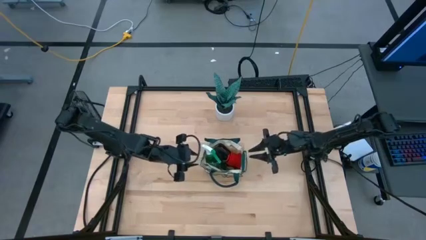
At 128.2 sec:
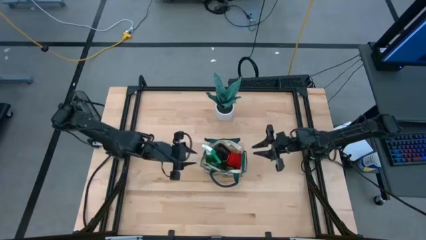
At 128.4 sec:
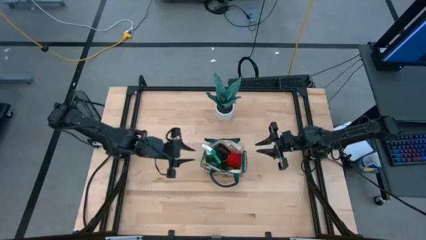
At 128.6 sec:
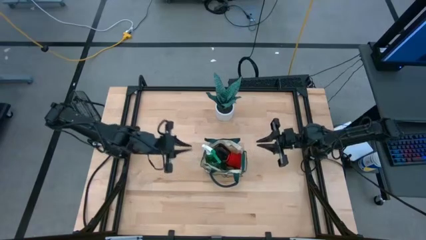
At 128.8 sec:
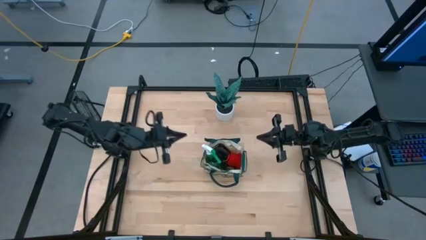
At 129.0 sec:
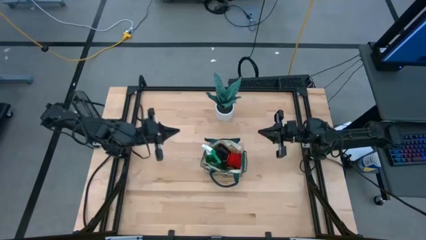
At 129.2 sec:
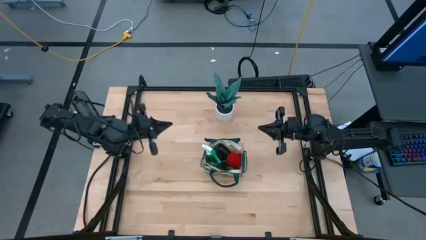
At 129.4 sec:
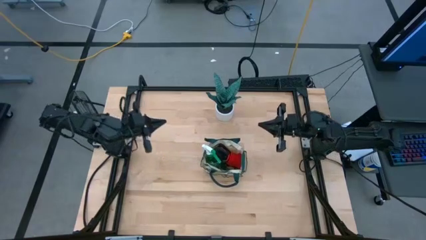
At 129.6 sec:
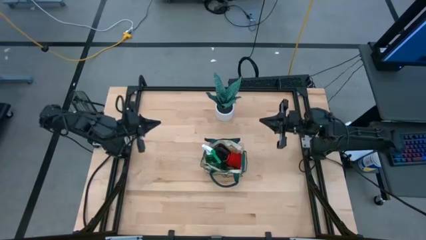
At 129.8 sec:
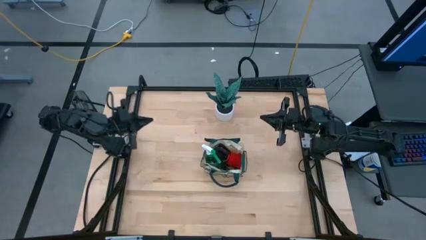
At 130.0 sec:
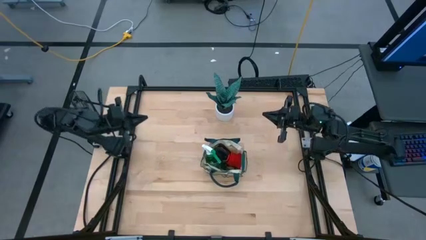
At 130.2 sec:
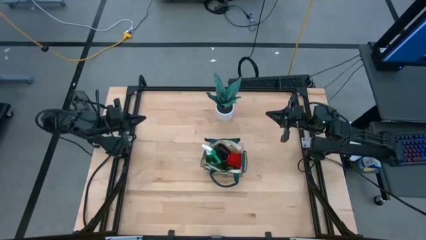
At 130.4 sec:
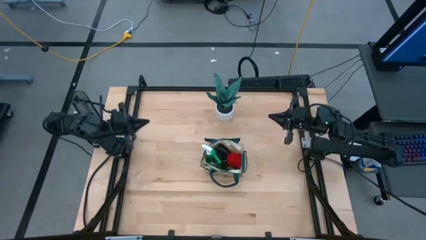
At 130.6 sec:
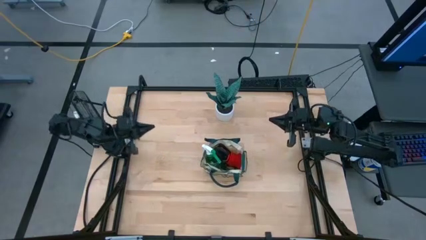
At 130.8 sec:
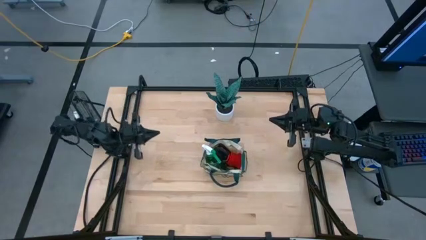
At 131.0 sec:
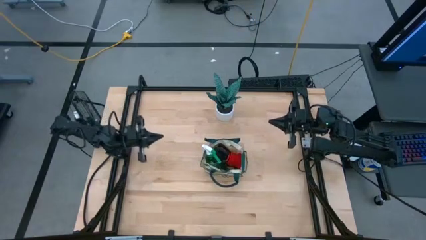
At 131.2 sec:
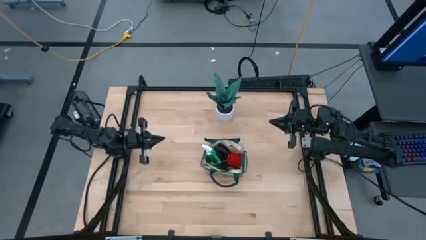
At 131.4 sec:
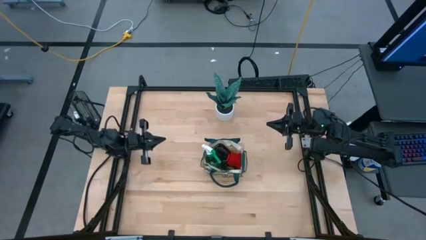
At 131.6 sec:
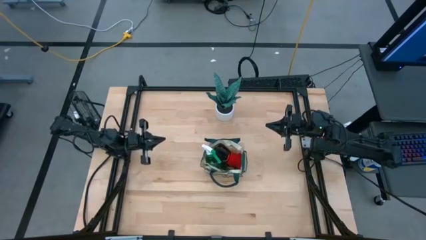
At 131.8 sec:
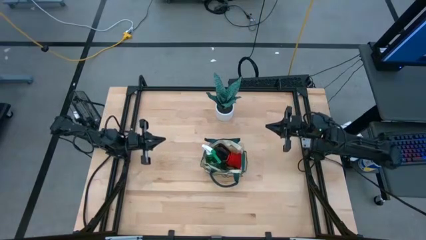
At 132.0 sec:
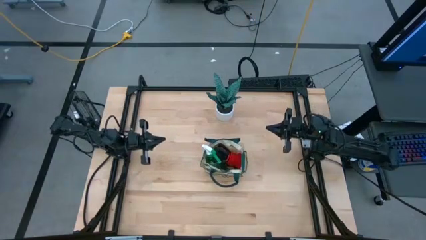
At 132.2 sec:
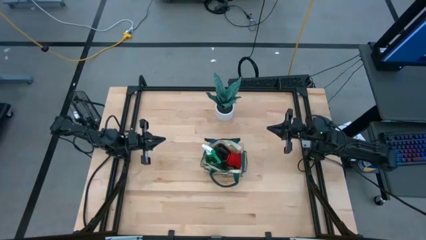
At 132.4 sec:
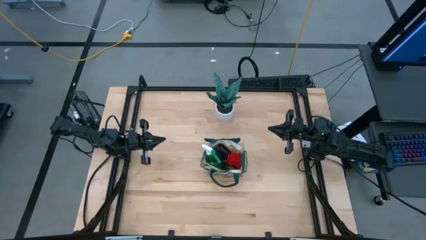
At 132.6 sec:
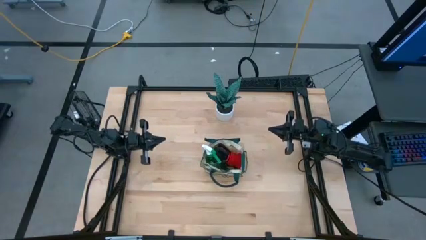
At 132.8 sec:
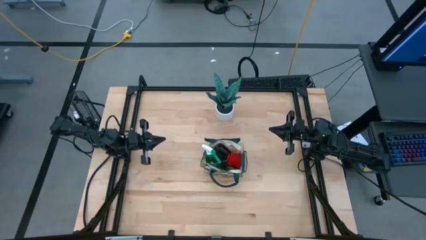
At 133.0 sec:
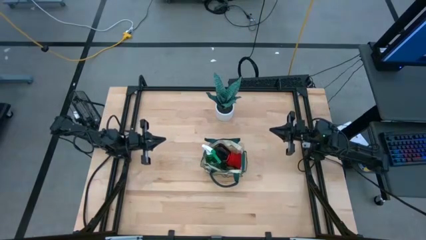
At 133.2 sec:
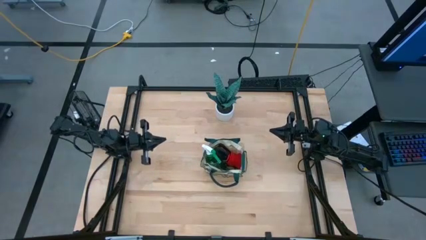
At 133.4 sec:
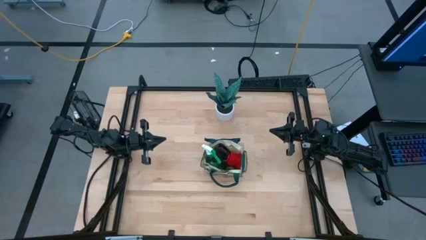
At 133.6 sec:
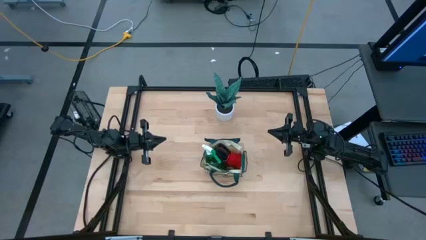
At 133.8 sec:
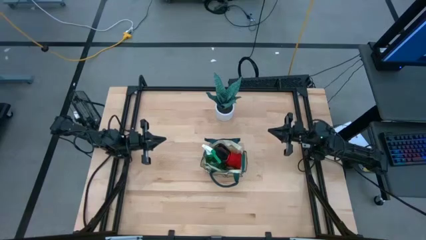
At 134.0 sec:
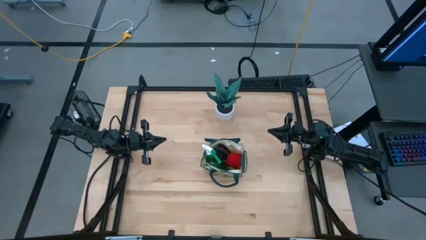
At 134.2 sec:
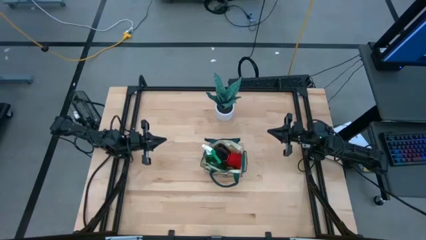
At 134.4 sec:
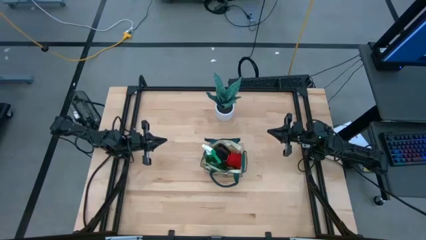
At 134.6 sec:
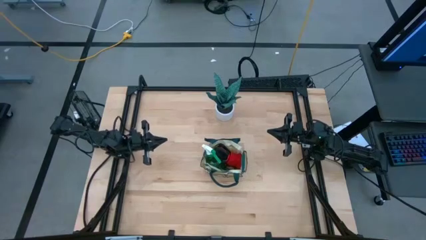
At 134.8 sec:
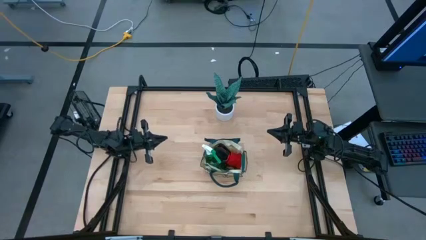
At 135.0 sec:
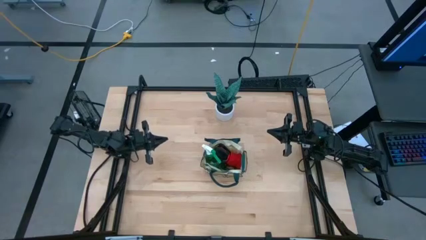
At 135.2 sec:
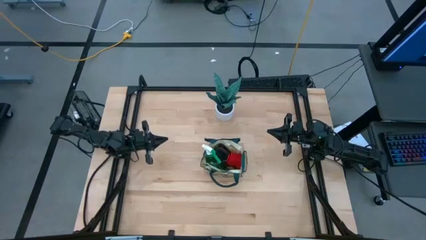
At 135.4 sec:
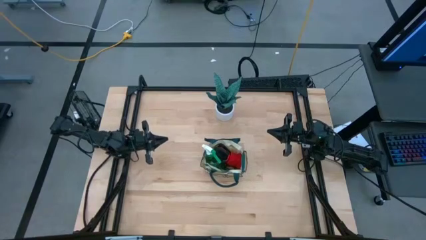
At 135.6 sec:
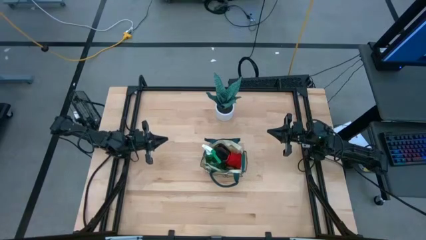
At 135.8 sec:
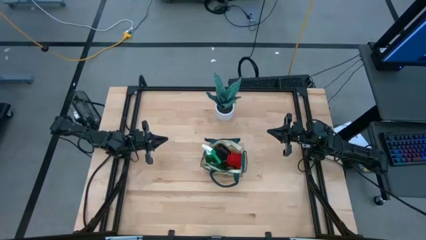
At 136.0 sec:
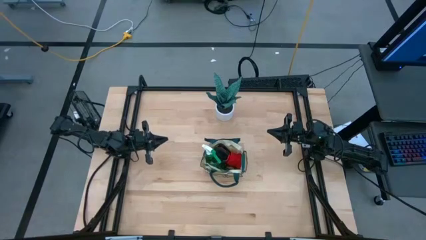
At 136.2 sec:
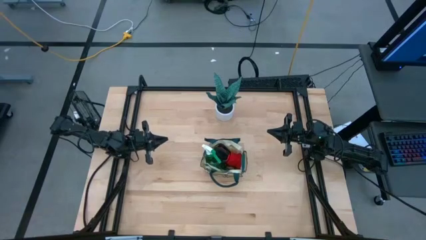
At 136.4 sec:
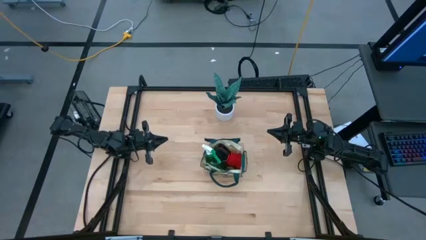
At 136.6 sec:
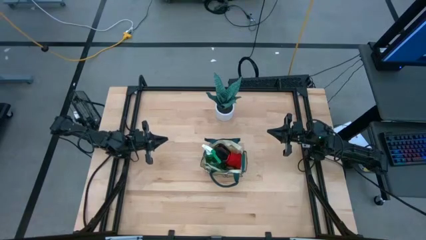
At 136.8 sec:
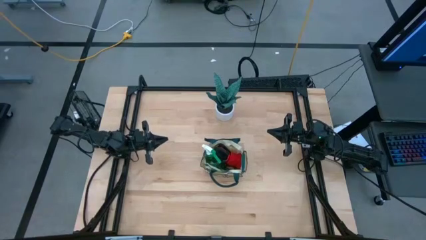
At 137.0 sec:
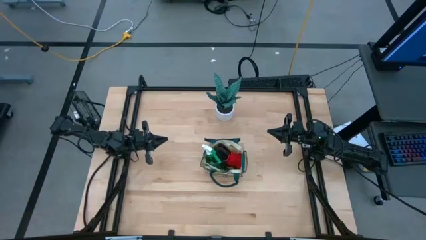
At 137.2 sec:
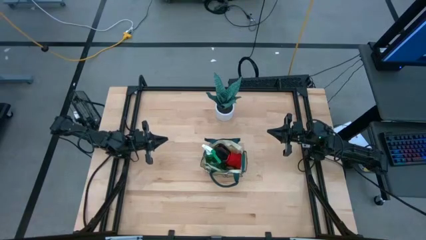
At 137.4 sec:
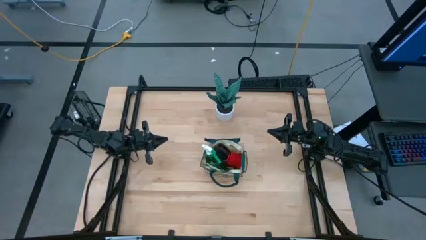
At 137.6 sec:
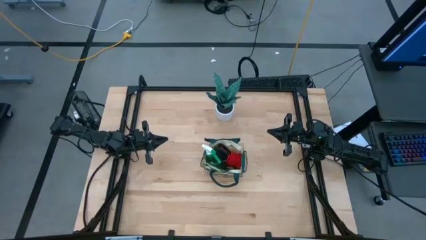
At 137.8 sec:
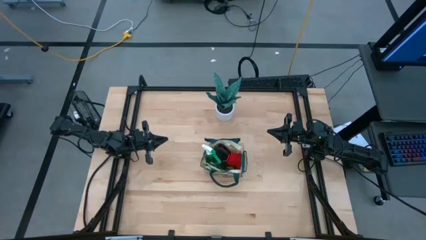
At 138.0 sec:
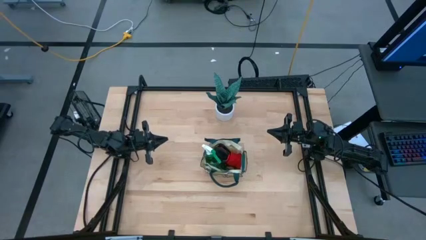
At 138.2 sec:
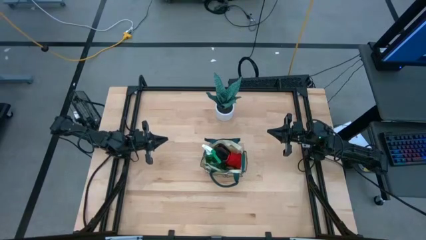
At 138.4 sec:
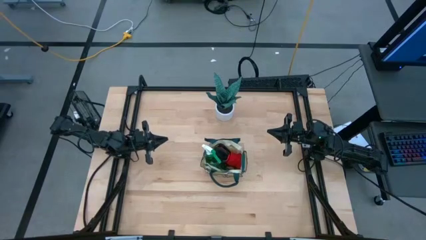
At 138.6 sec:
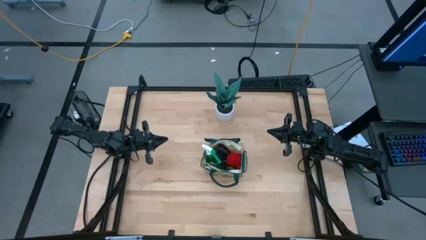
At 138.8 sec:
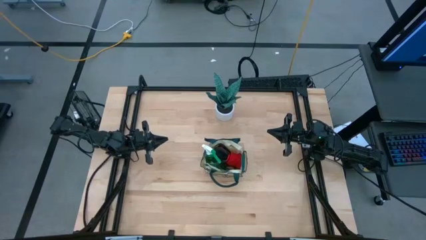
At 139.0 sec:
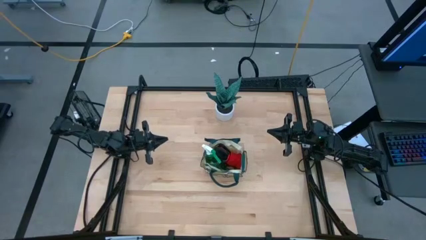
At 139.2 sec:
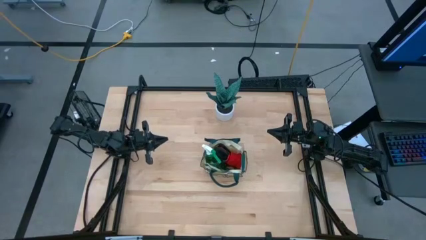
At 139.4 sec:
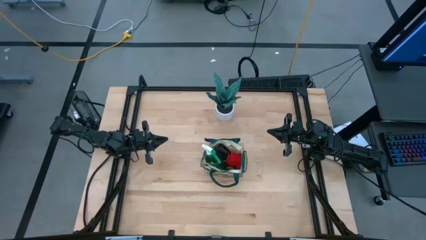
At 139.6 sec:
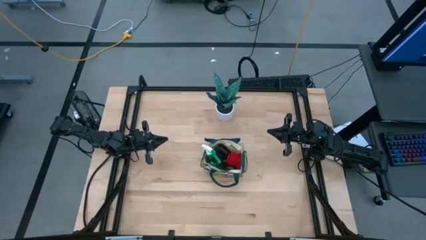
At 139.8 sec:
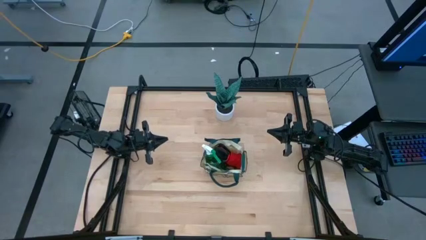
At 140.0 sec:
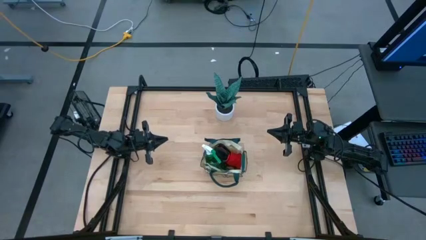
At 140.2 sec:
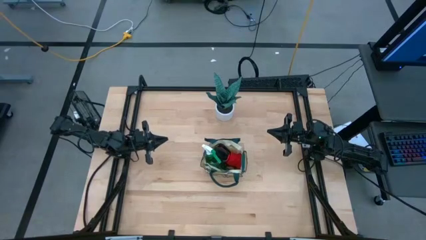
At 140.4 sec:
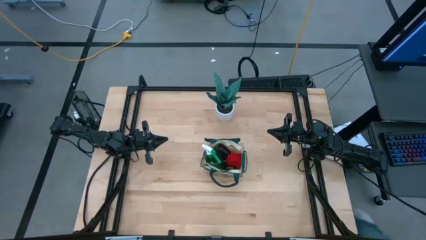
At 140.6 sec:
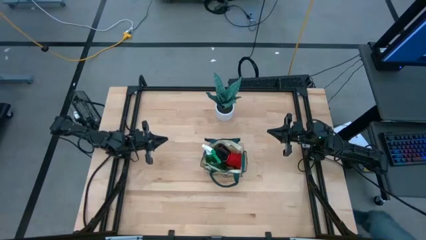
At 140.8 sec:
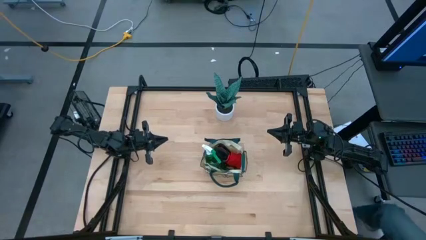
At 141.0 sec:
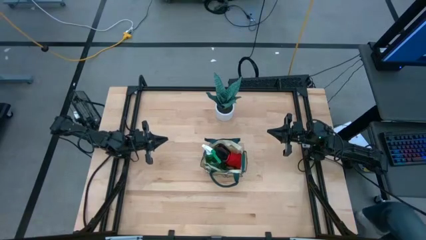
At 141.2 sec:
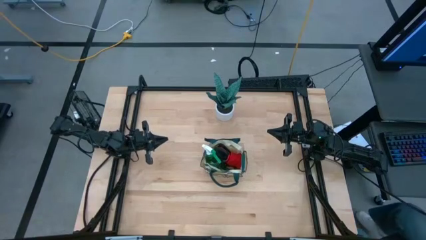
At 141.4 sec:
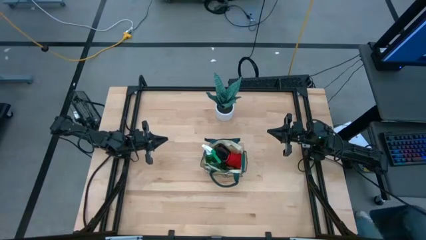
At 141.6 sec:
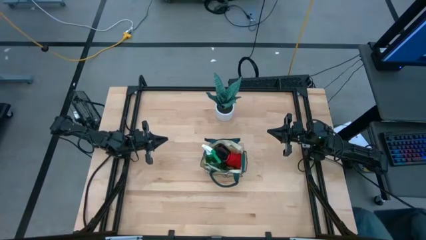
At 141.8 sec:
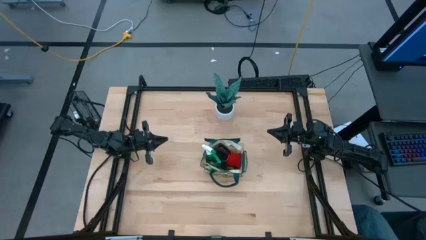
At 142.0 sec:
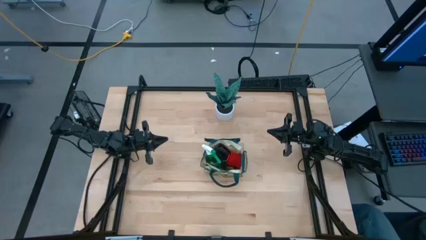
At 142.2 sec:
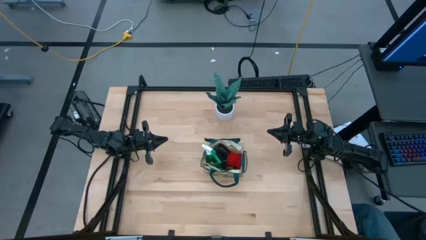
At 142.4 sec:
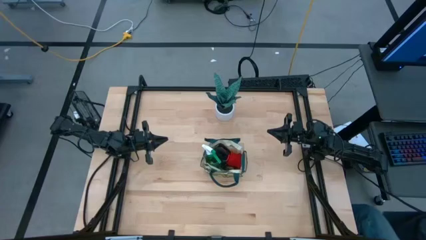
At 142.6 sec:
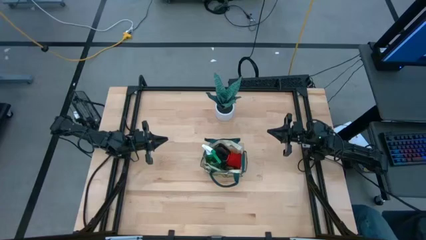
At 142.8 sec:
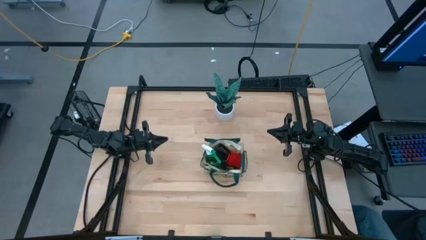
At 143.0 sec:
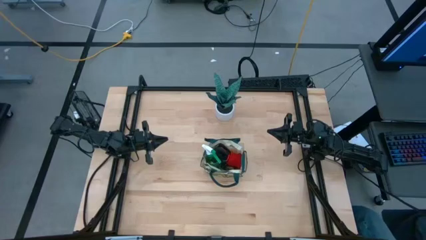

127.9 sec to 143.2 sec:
Task: Pick & Place Garden tools in Gardening bag
Return to Home Position

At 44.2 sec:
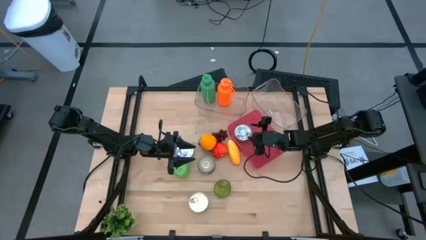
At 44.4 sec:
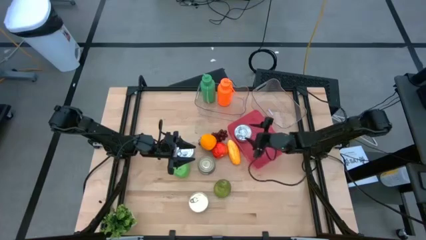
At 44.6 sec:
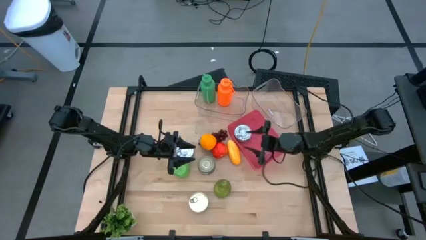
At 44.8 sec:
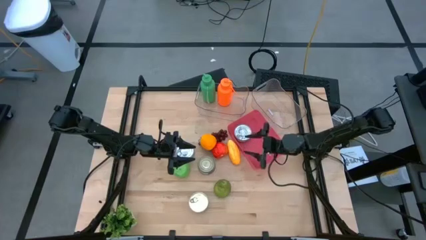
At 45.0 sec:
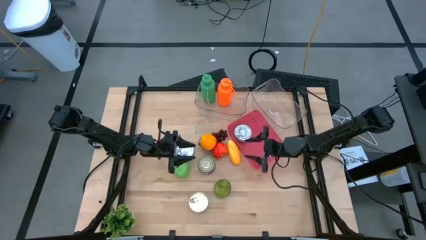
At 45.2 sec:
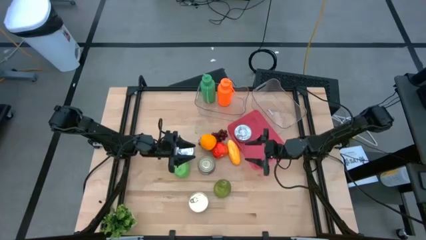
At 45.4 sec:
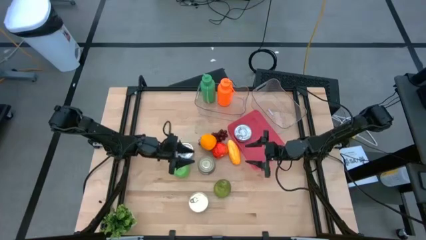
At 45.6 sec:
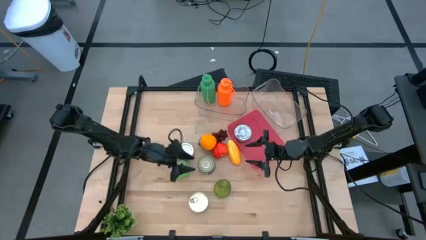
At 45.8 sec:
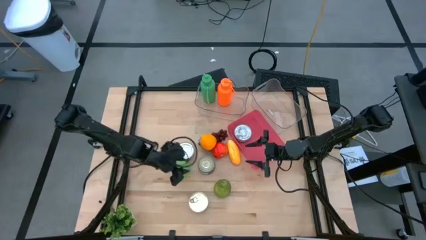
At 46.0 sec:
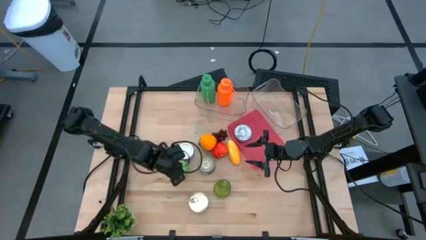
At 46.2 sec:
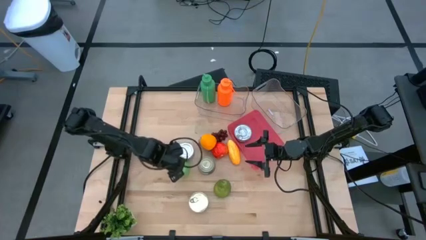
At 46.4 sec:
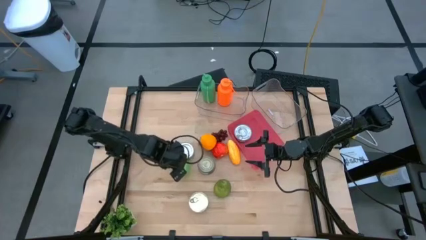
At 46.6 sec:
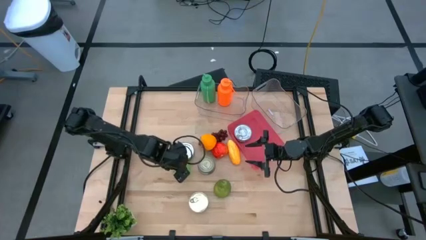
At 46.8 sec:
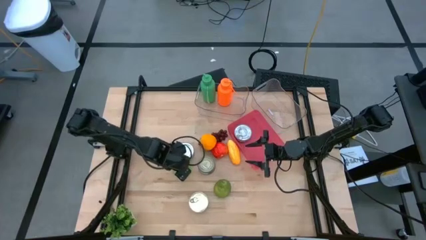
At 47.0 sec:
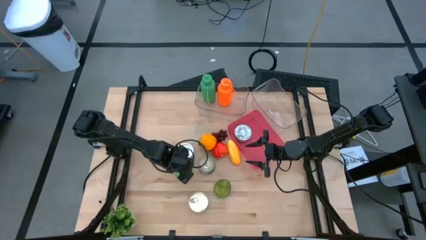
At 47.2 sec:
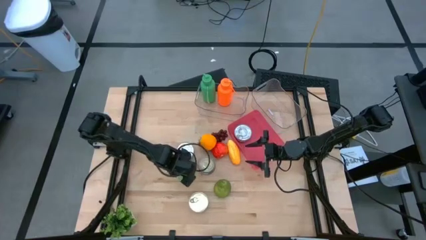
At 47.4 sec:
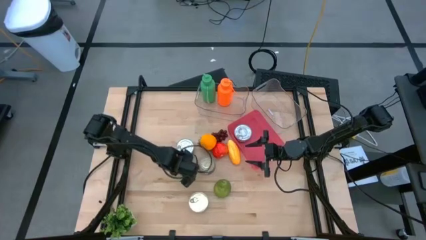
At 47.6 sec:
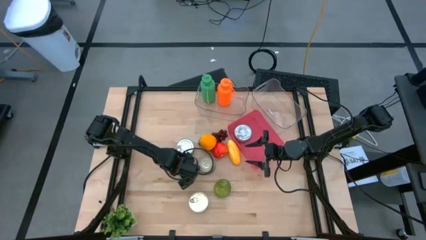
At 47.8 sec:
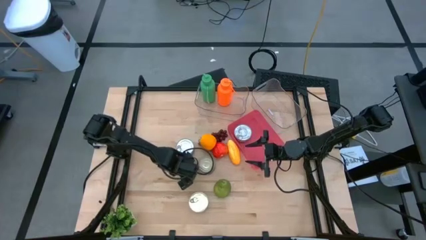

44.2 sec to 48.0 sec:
Task: Pick & Place Food Item
Put the green apple into the right transparent bin
